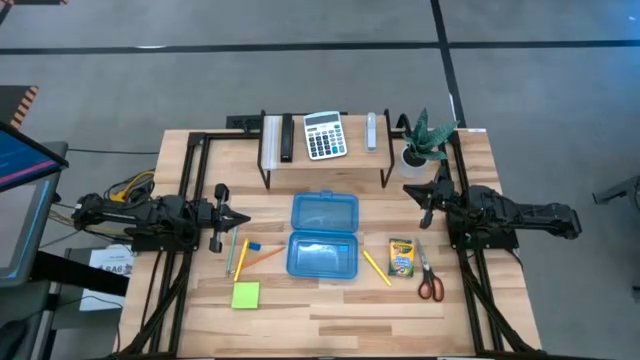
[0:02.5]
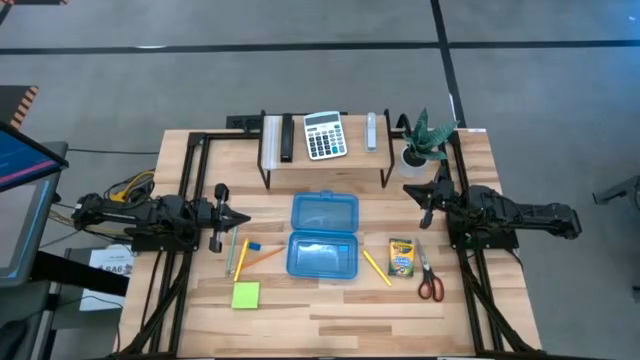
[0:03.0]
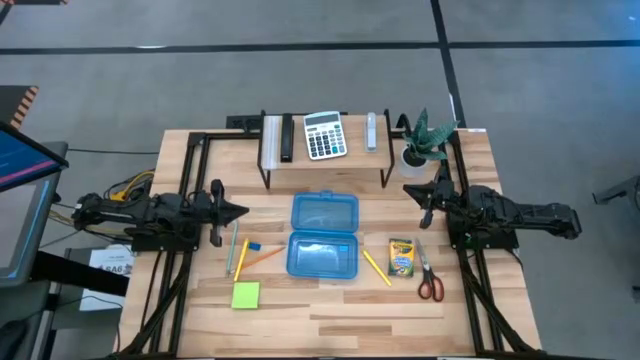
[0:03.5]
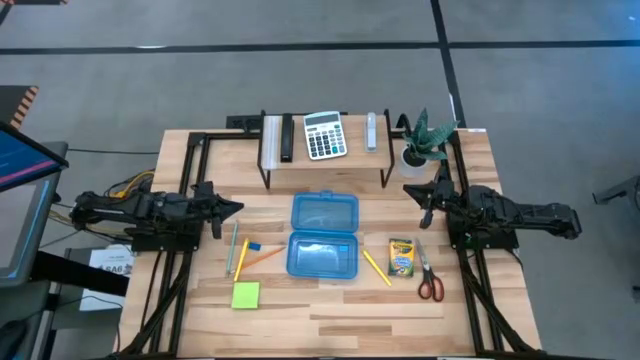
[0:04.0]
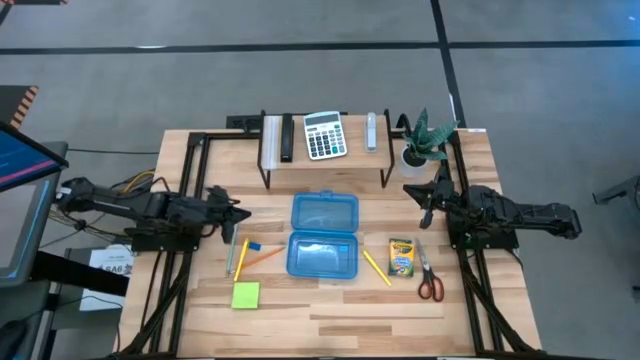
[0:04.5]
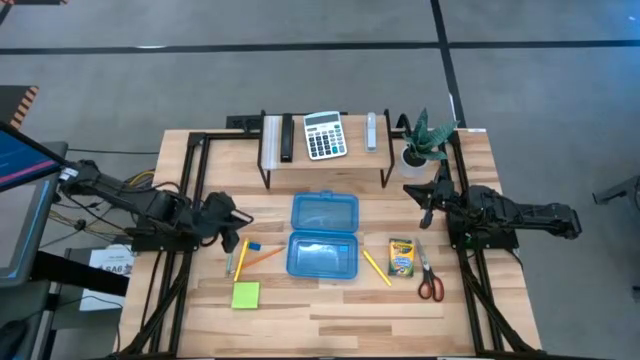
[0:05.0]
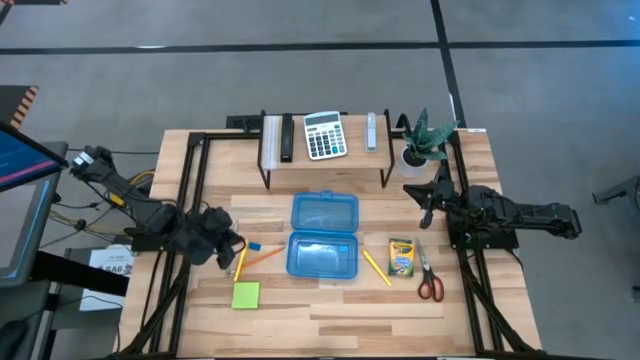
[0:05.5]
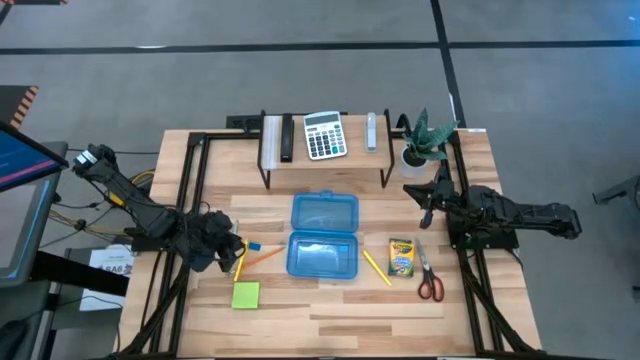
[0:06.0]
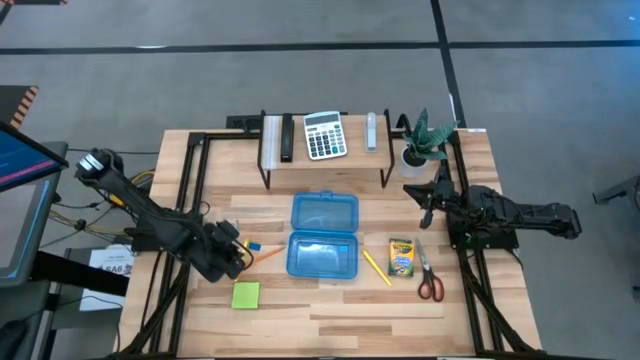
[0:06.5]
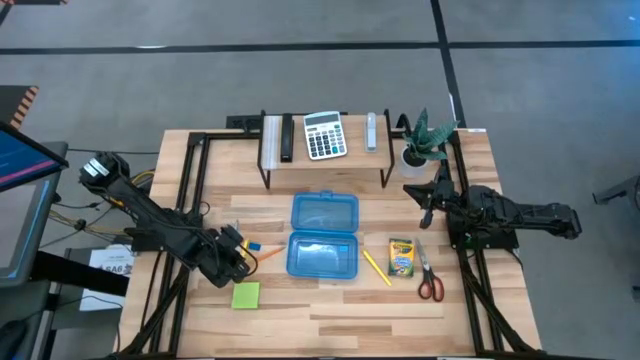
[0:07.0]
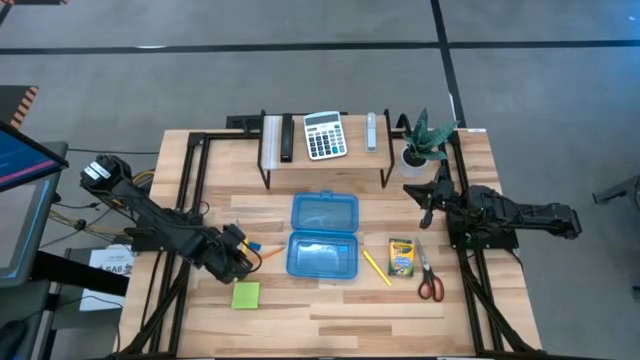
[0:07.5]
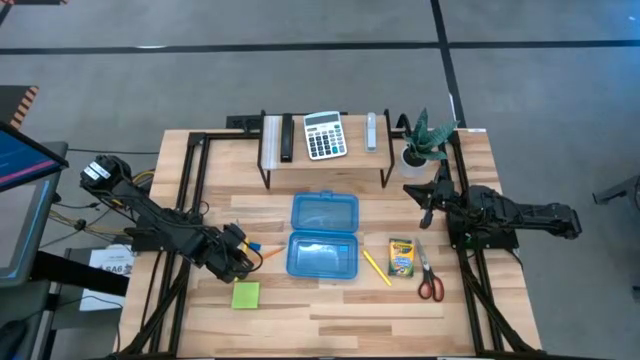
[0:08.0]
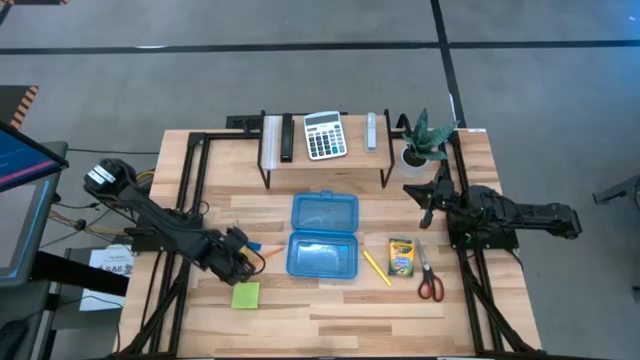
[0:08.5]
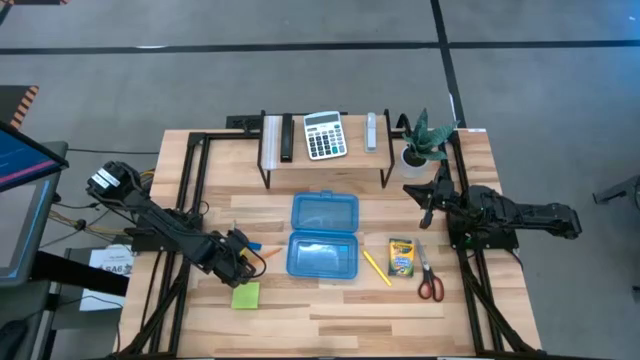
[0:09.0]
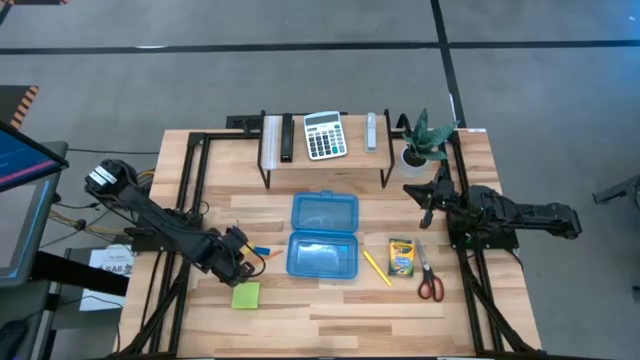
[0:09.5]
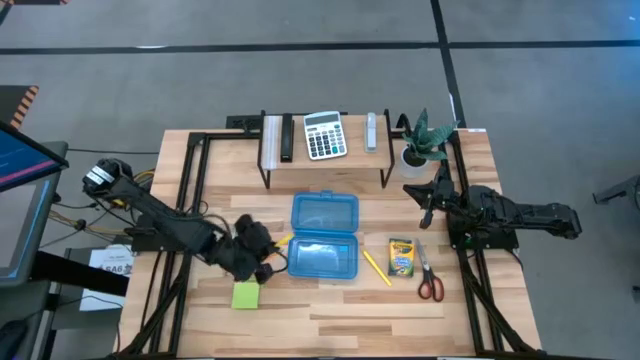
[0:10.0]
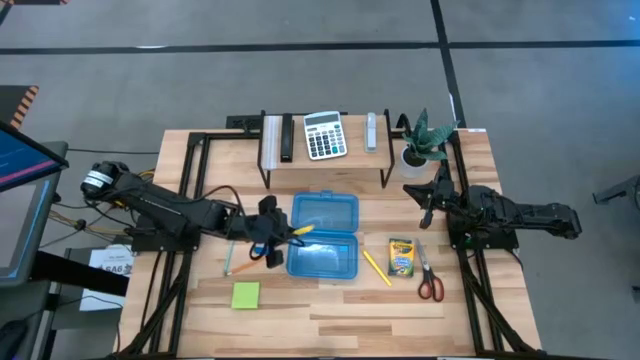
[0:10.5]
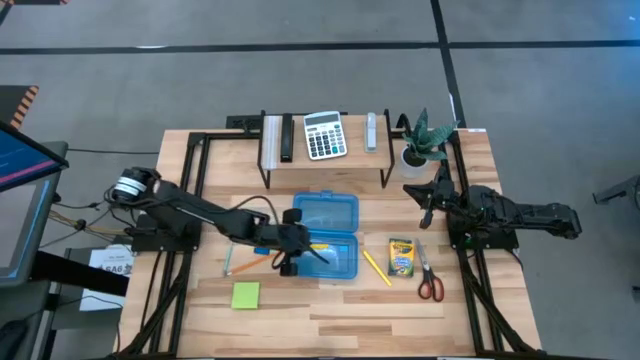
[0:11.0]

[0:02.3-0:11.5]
Task: Pack school essentials
Put the left yellow pen into the blue supply box

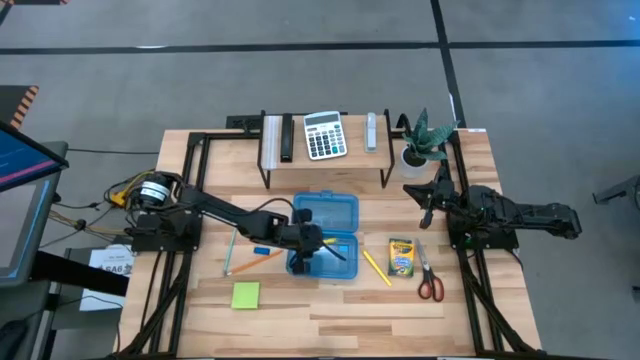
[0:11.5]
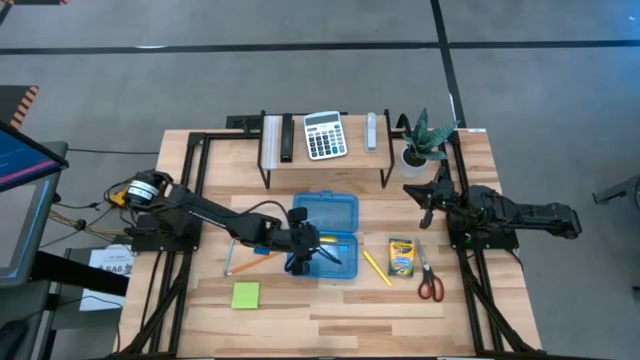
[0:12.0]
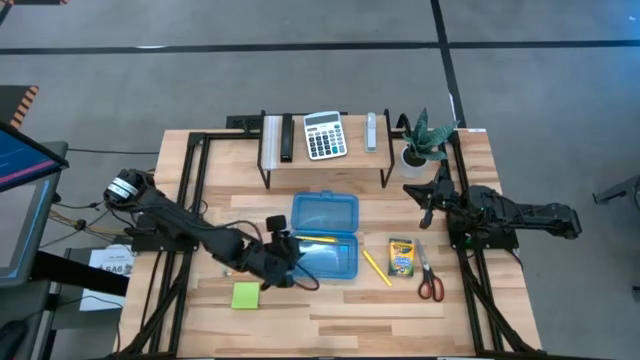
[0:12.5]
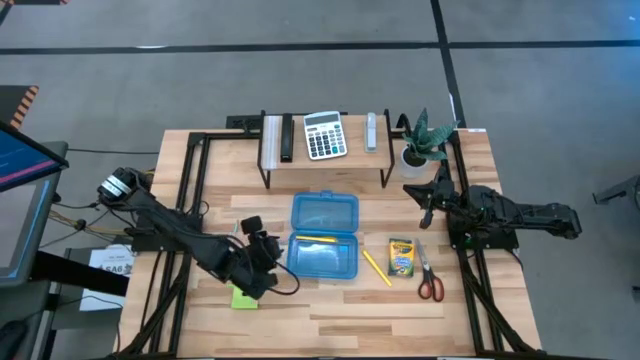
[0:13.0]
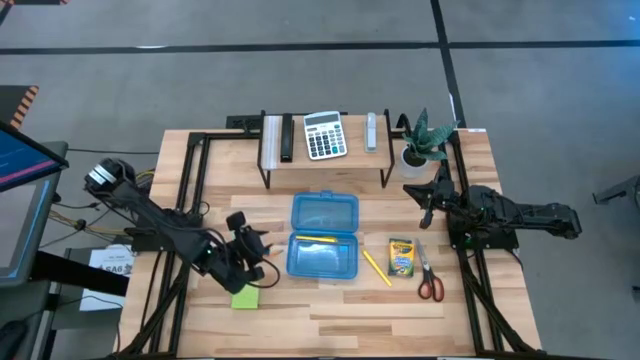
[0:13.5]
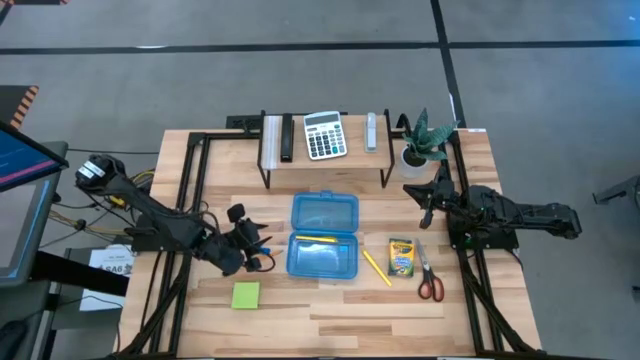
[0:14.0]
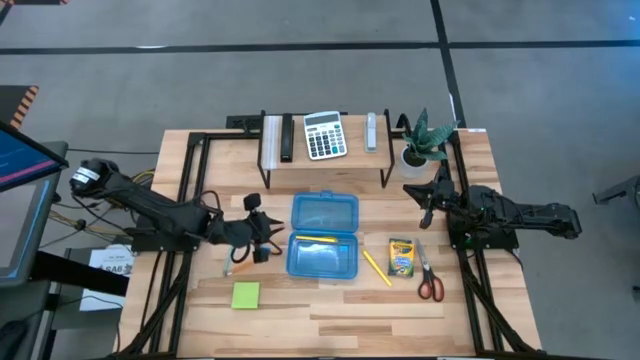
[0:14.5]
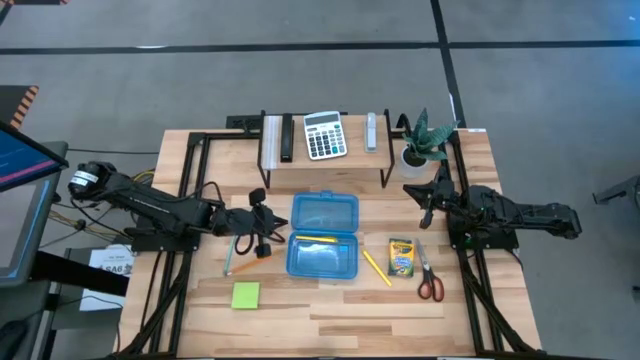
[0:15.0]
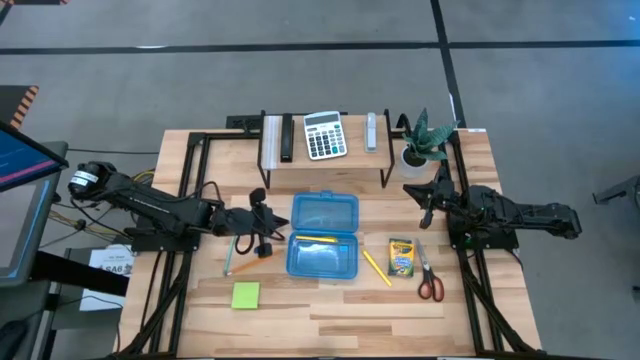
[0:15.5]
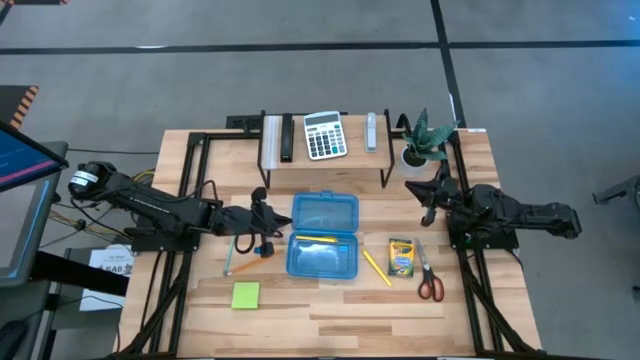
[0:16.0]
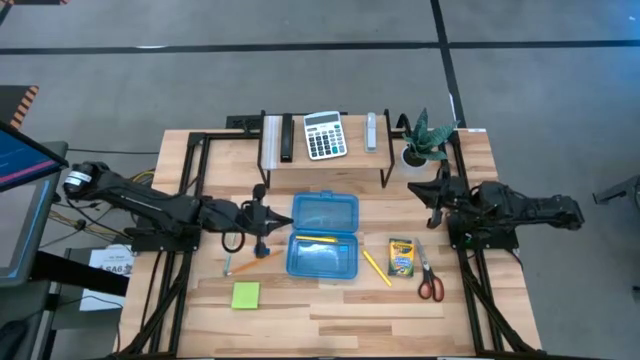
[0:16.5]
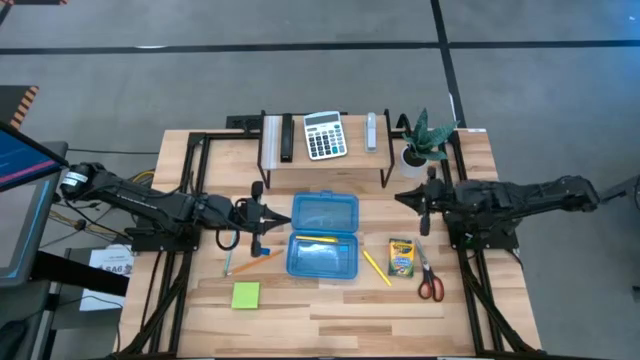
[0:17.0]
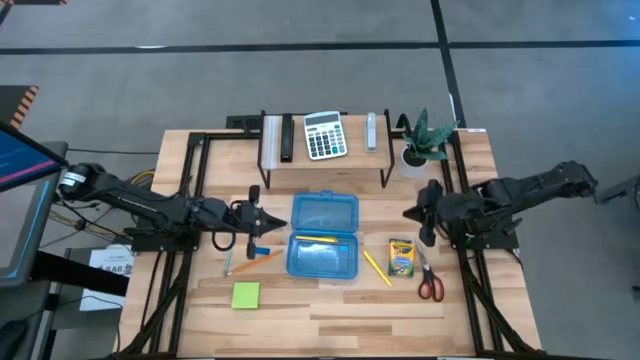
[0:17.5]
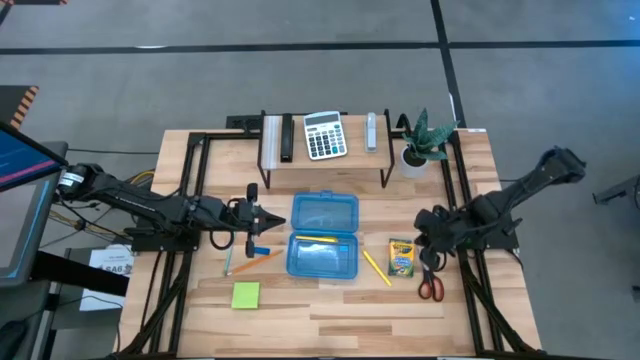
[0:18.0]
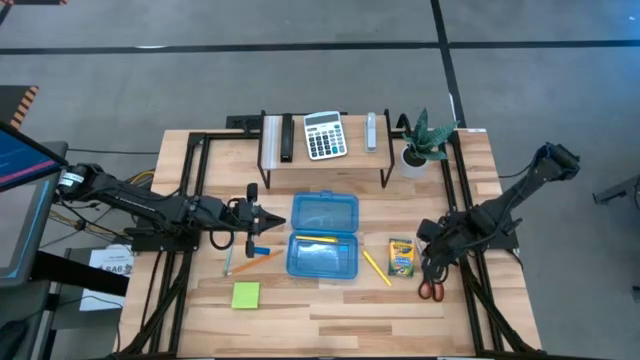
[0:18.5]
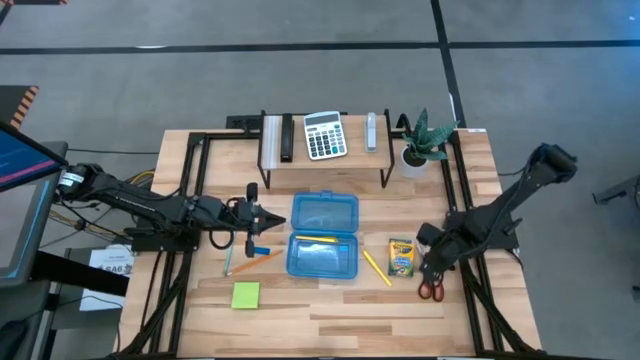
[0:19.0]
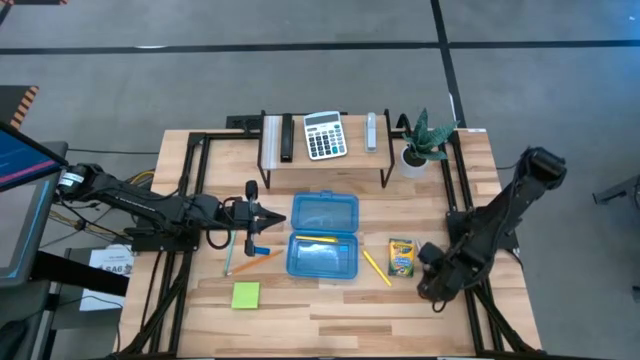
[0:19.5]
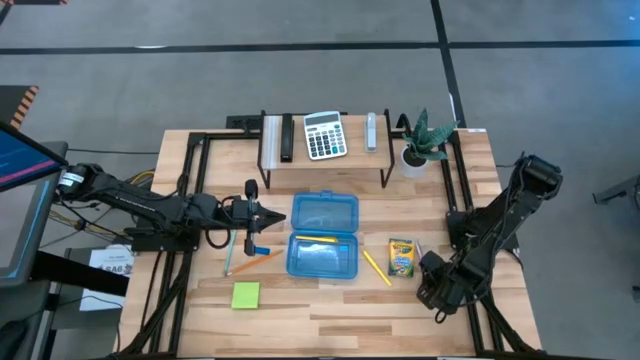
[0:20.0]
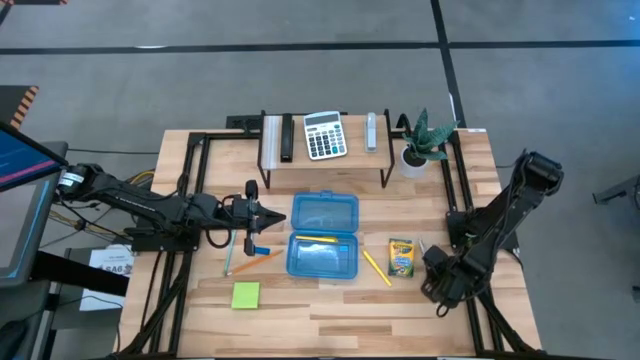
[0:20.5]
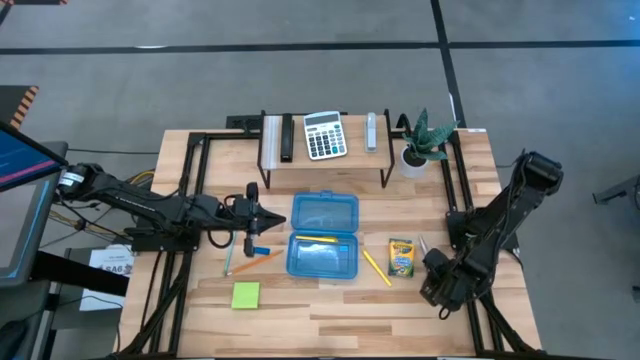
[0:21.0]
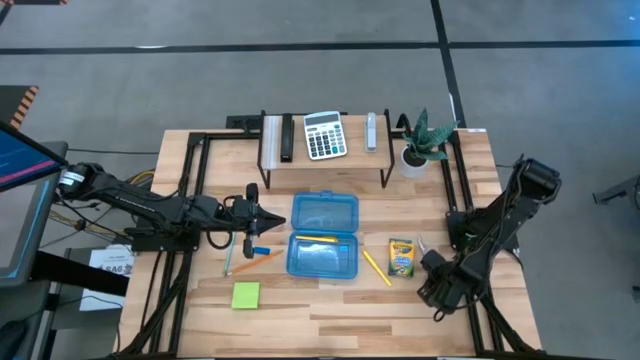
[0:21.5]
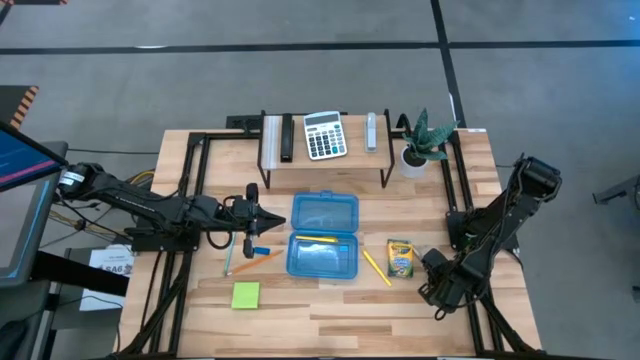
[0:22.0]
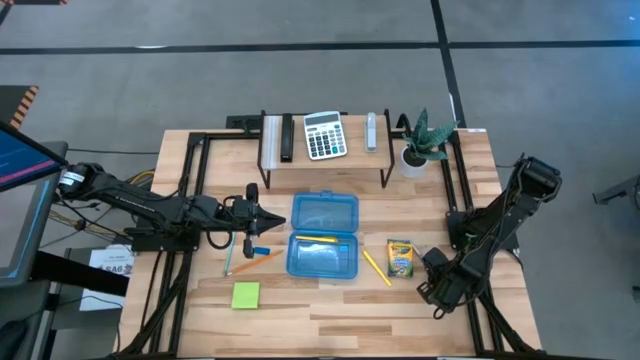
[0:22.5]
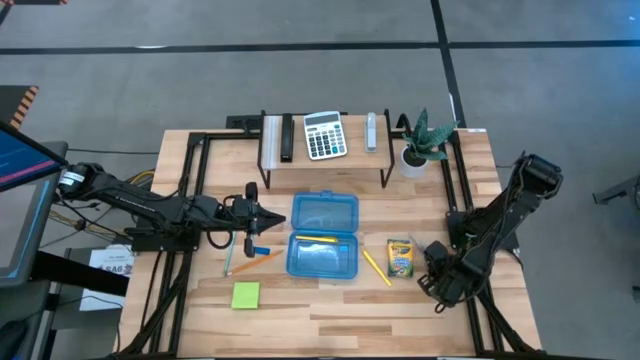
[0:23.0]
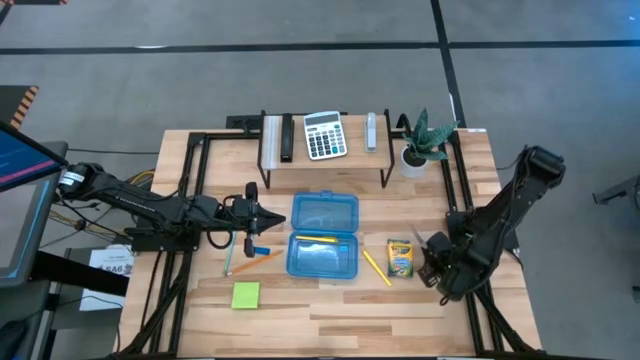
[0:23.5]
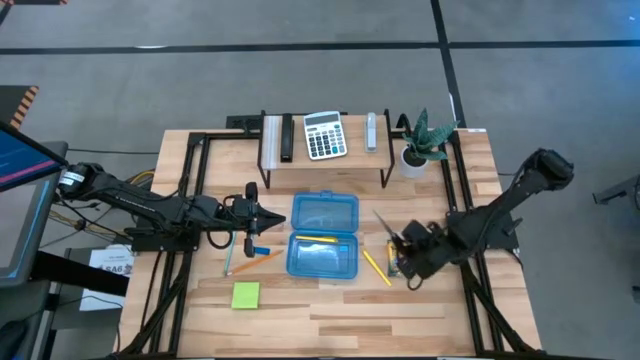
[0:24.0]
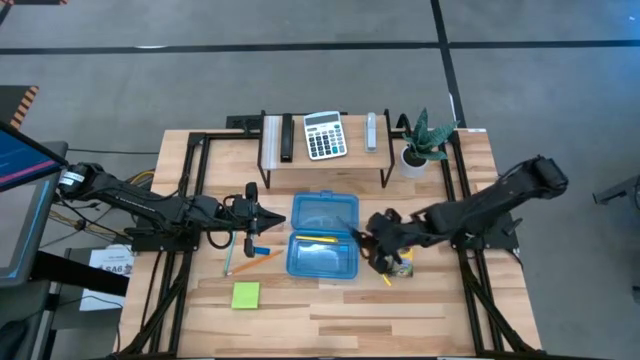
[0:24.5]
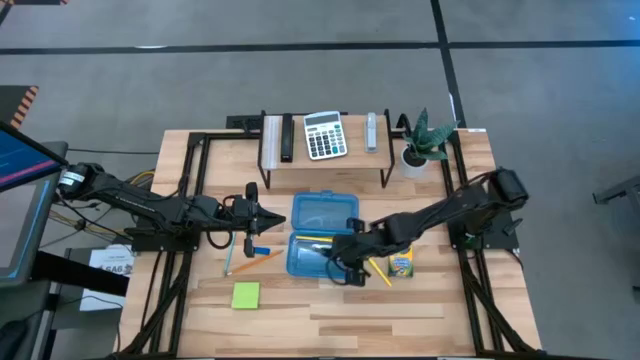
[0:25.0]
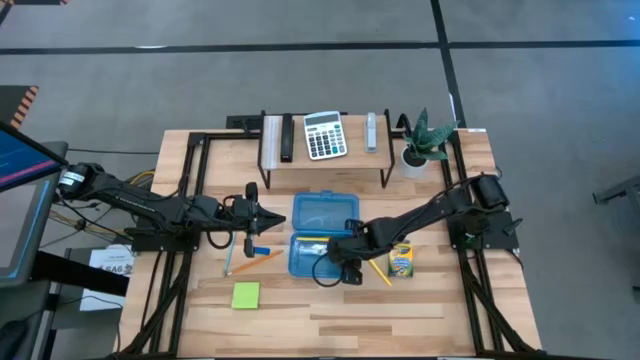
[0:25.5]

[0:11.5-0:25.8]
Put the black scissors into the blue supply box
